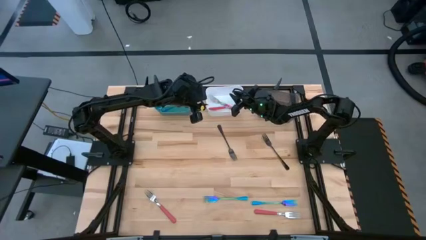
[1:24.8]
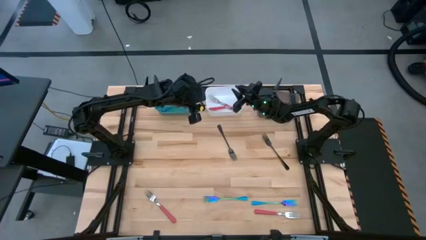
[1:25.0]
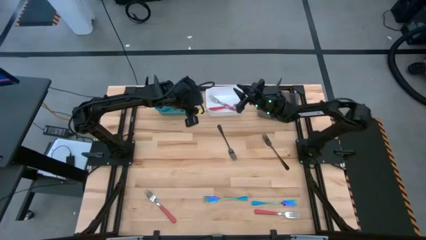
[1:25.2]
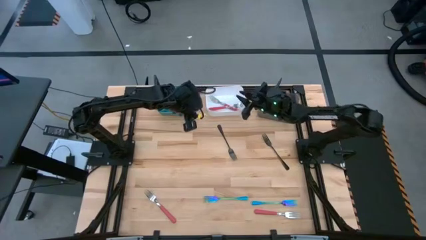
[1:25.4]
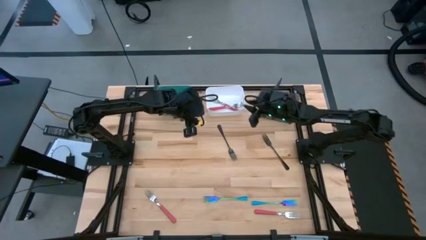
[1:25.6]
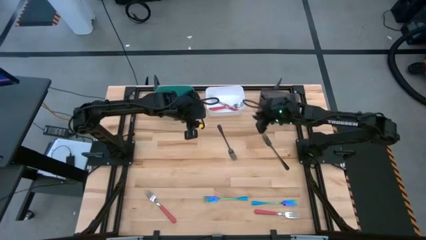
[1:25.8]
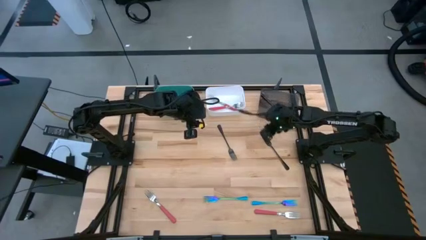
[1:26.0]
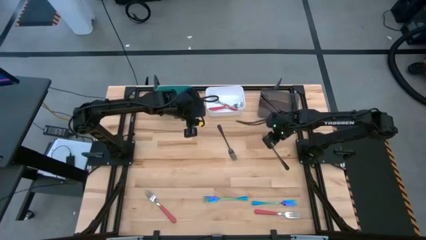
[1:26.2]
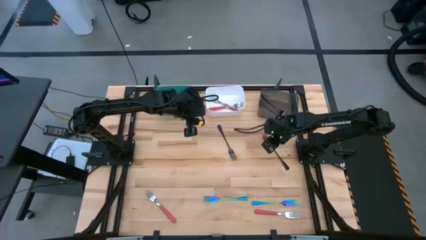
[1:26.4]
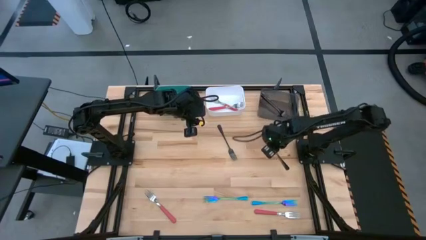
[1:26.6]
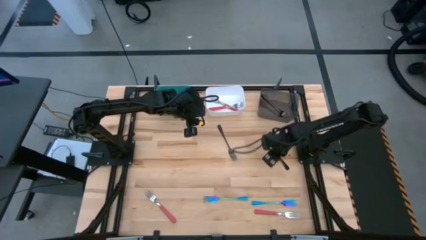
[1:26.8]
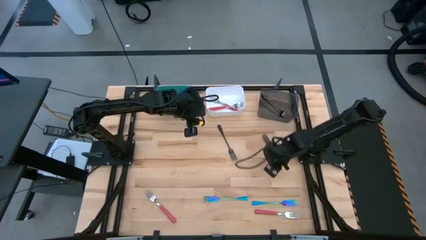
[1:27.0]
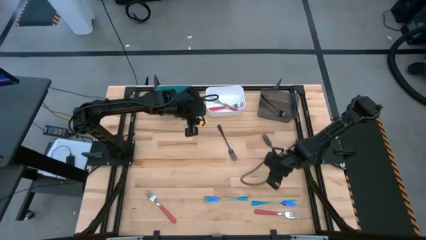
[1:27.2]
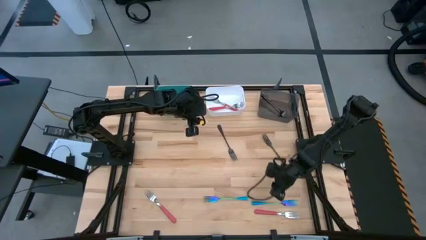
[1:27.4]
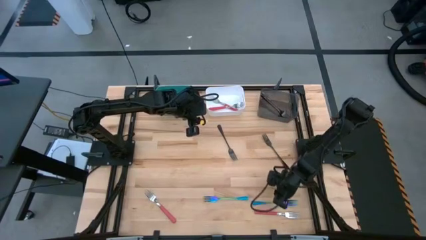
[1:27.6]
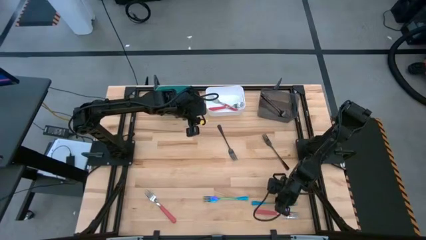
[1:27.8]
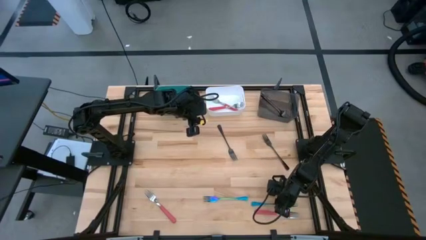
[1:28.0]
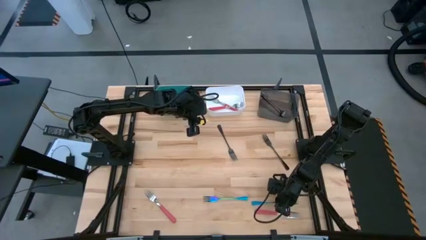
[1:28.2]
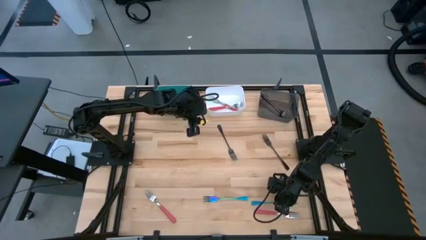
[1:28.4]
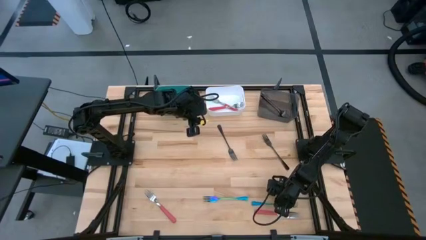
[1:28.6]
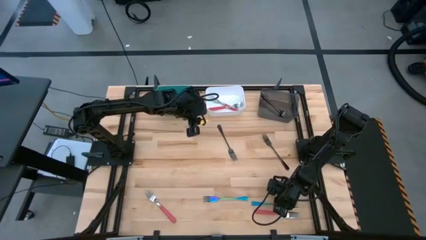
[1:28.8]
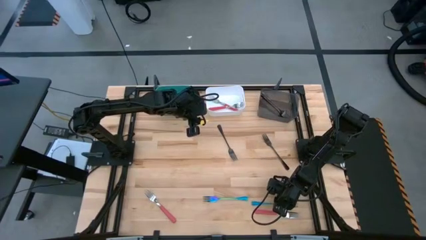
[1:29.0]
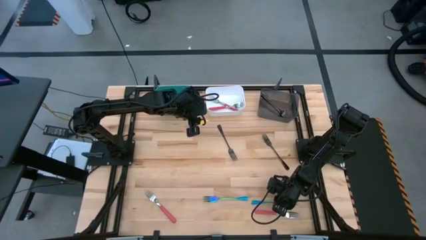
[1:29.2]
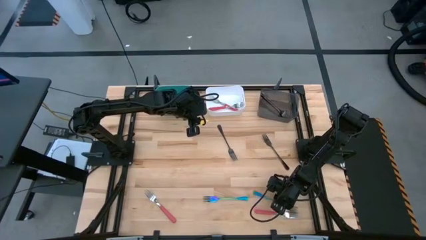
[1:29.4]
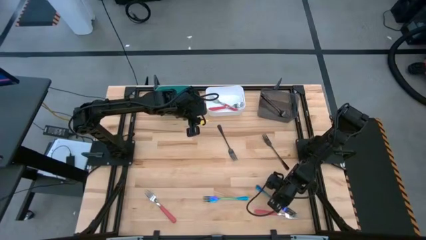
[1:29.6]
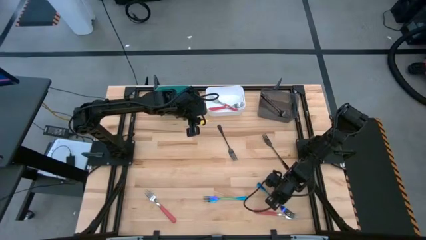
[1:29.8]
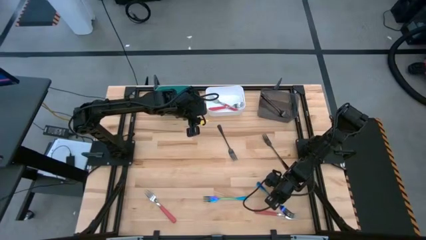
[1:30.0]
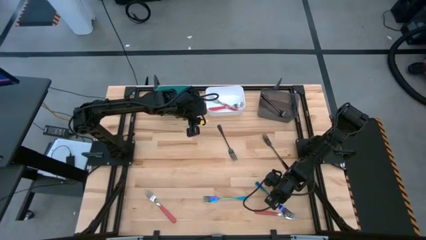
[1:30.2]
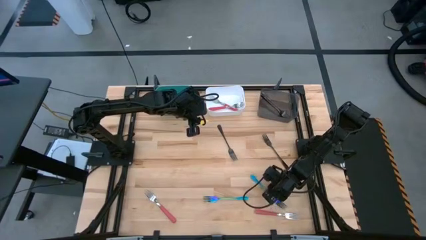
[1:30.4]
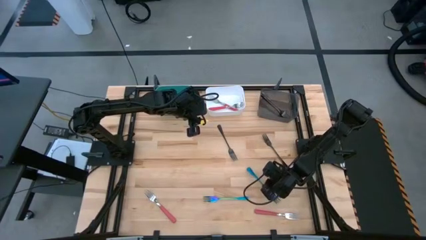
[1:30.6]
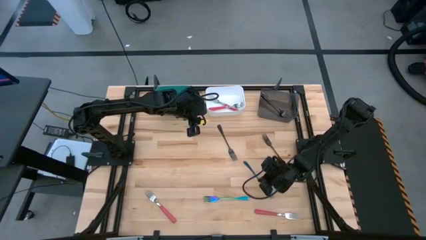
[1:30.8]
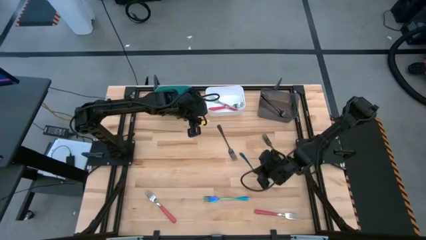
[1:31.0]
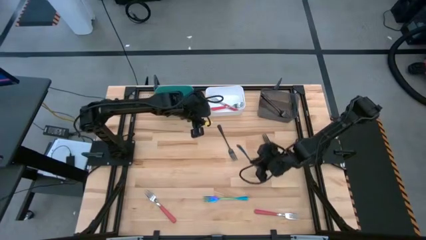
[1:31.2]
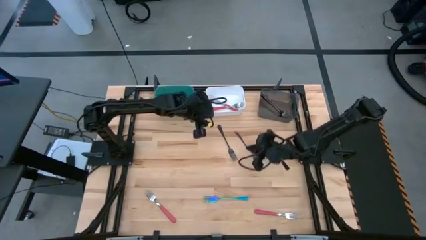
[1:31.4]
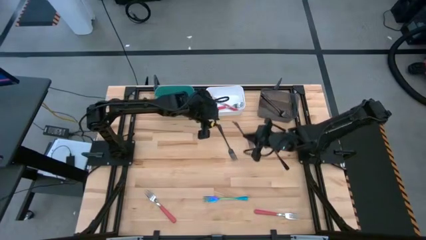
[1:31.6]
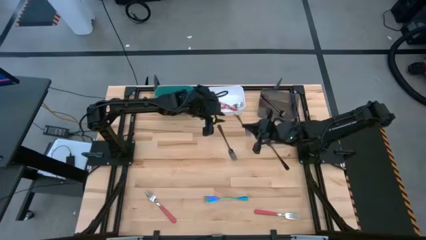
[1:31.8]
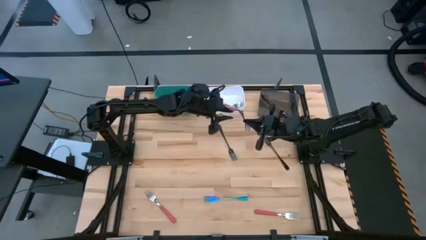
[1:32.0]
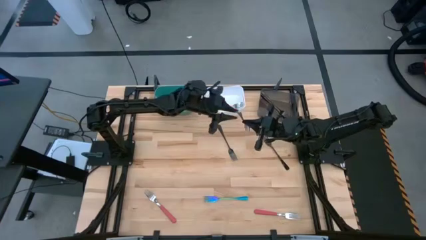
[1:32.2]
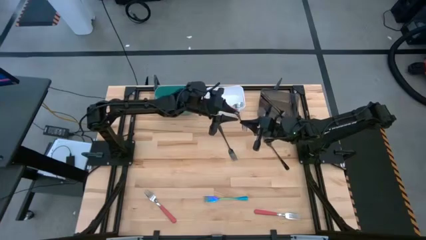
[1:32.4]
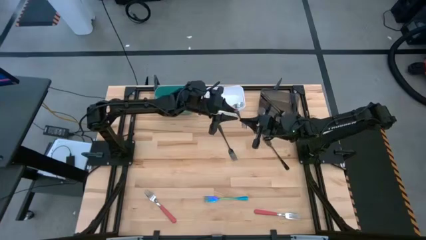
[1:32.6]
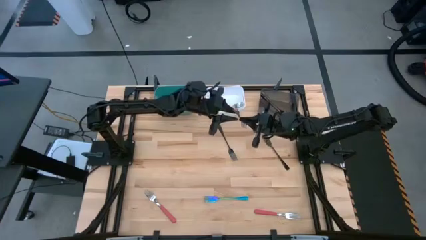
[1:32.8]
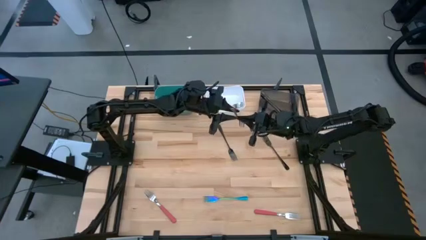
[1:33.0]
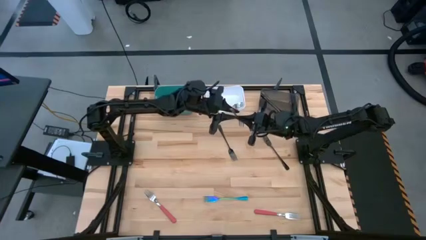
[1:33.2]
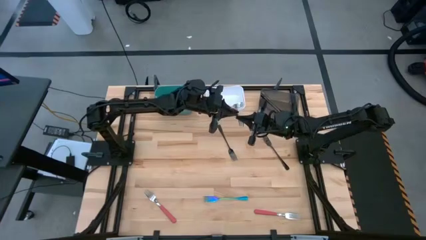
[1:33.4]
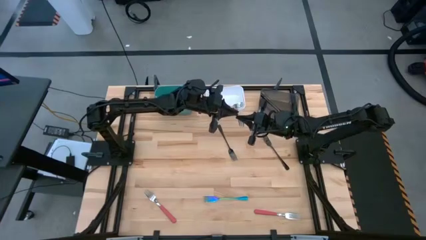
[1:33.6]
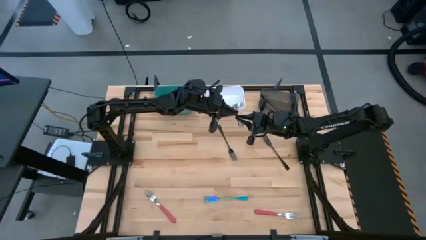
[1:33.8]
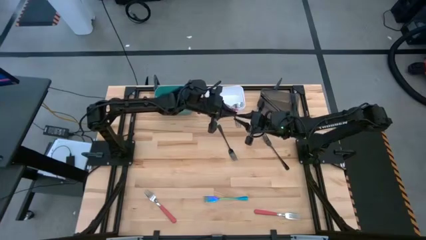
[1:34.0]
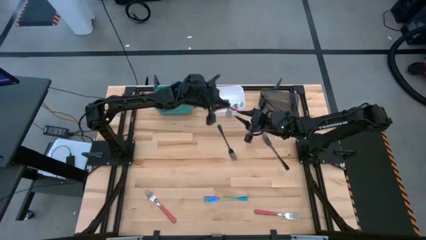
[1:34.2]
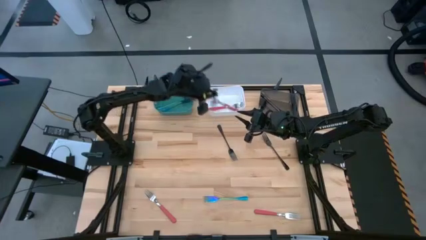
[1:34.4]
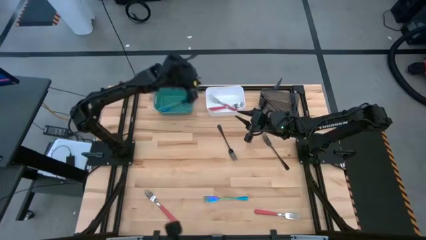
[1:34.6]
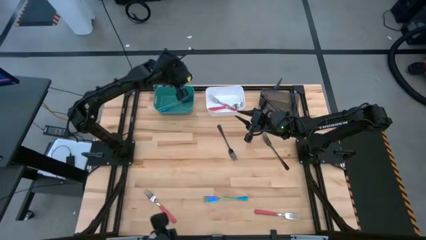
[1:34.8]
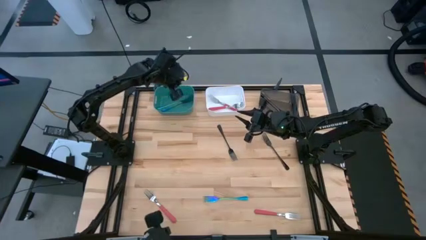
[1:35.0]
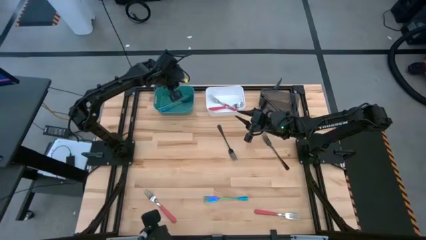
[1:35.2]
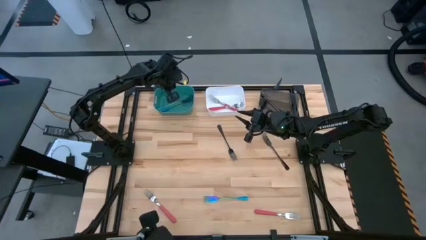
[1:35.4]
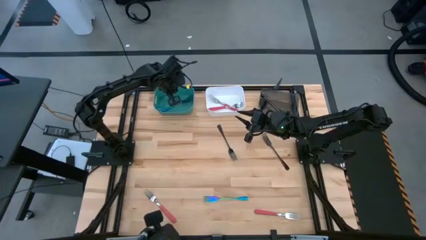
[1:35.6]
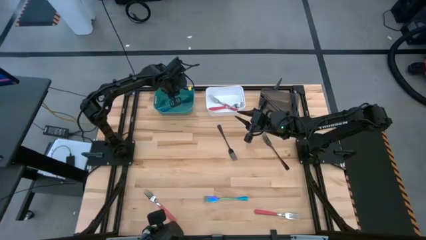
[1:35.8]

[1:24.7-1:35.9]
Task: Sort silverware by color (type)
Put the iridescent blue fork into the green bin
